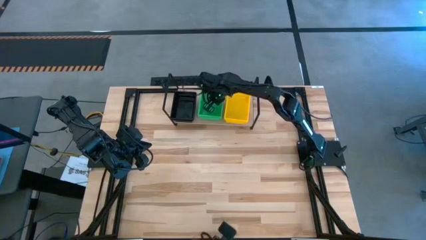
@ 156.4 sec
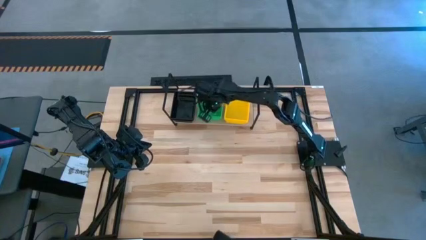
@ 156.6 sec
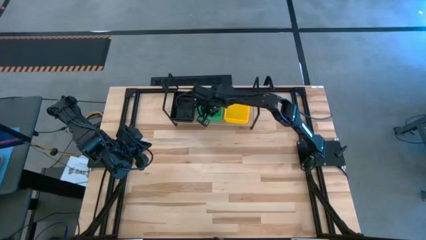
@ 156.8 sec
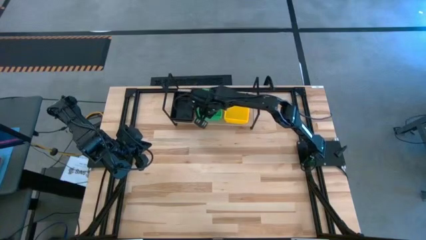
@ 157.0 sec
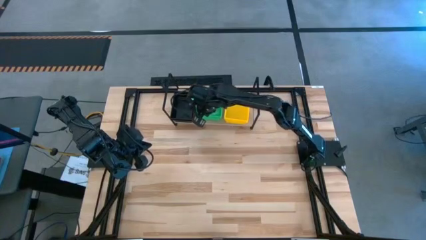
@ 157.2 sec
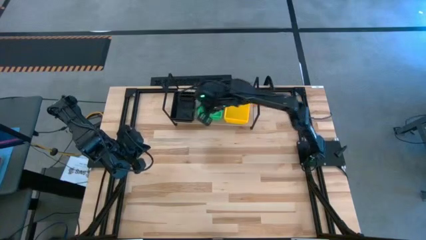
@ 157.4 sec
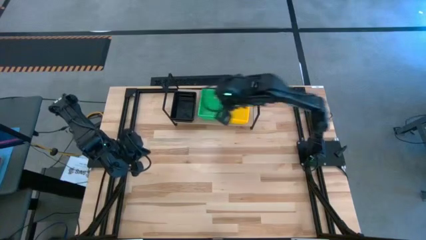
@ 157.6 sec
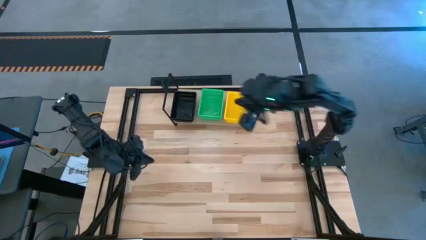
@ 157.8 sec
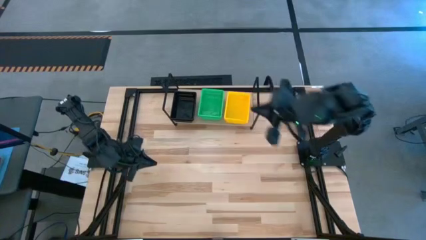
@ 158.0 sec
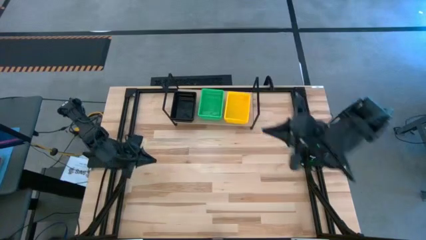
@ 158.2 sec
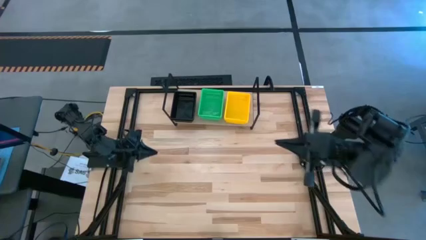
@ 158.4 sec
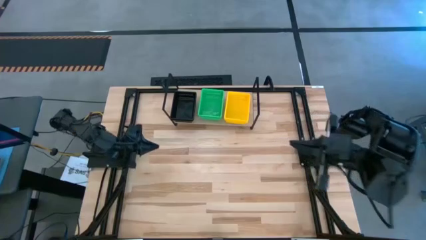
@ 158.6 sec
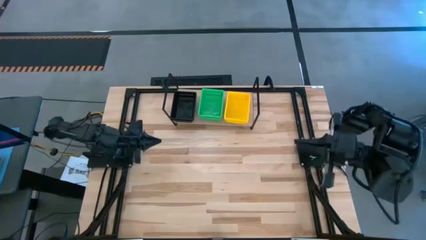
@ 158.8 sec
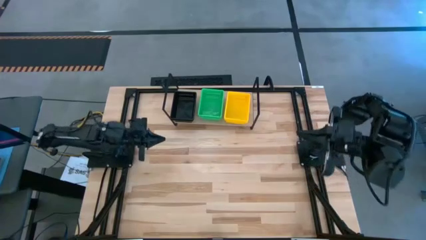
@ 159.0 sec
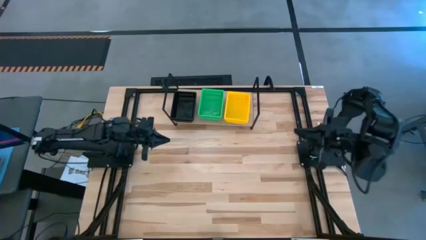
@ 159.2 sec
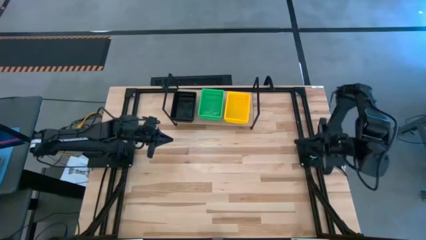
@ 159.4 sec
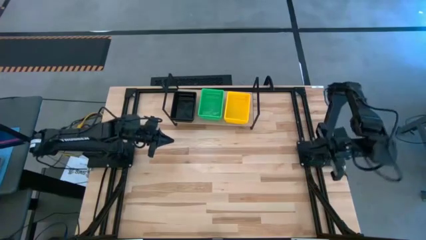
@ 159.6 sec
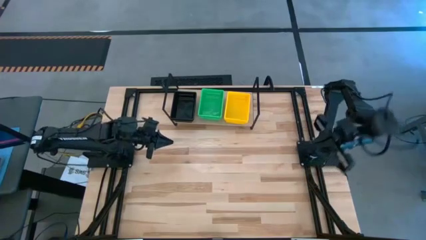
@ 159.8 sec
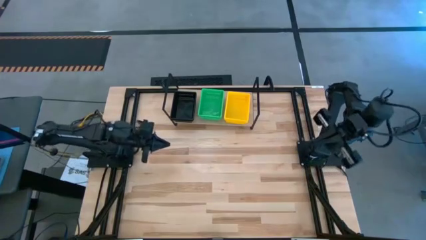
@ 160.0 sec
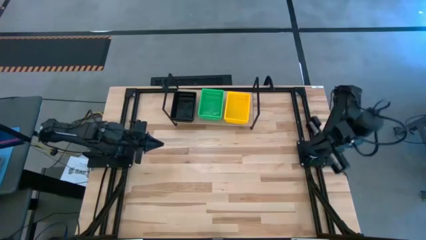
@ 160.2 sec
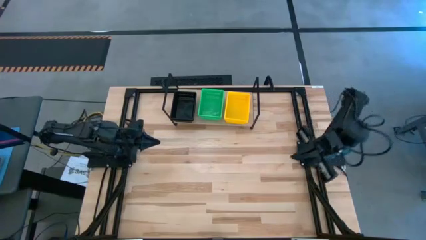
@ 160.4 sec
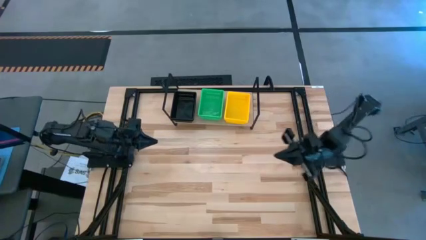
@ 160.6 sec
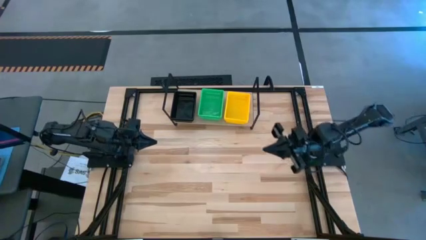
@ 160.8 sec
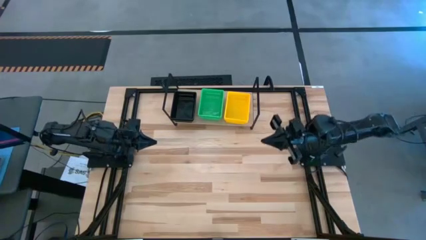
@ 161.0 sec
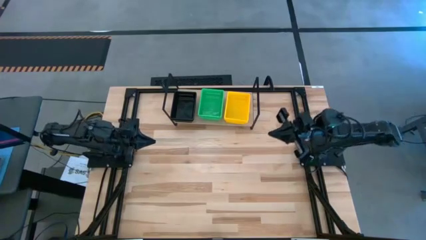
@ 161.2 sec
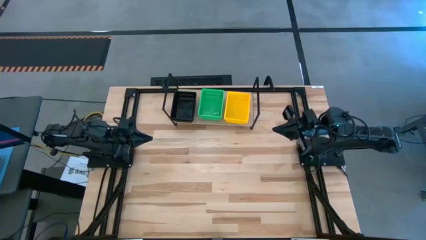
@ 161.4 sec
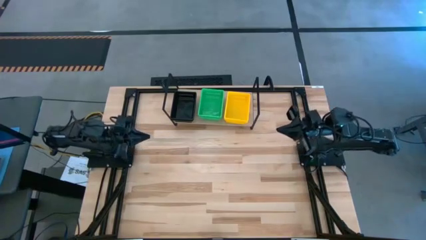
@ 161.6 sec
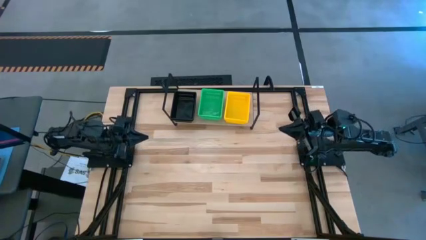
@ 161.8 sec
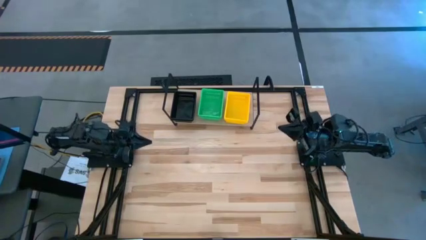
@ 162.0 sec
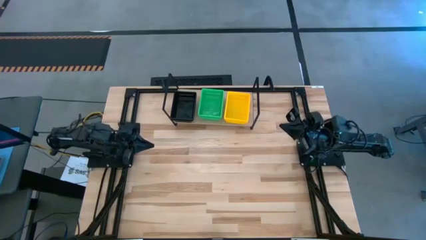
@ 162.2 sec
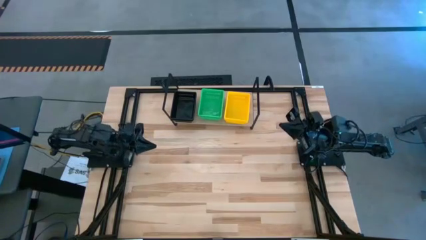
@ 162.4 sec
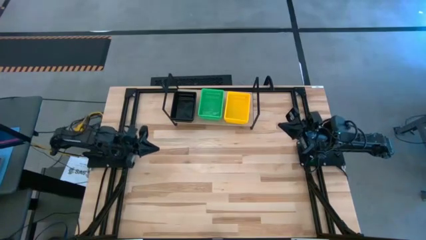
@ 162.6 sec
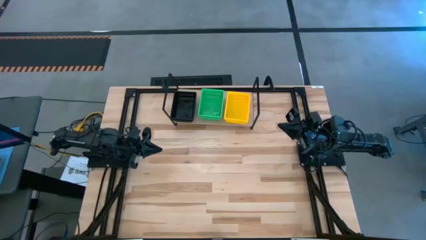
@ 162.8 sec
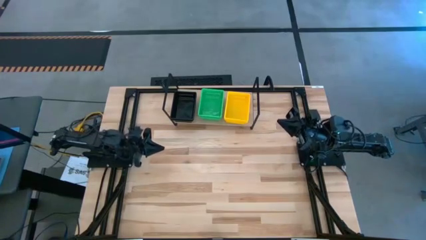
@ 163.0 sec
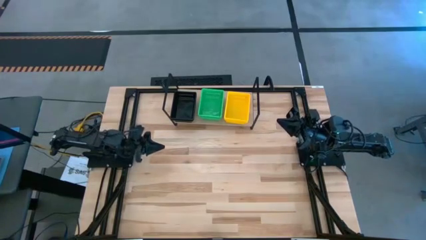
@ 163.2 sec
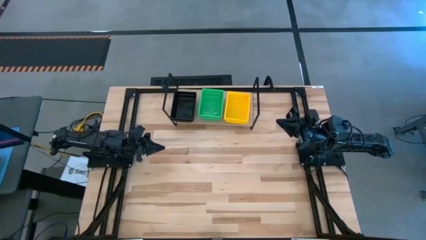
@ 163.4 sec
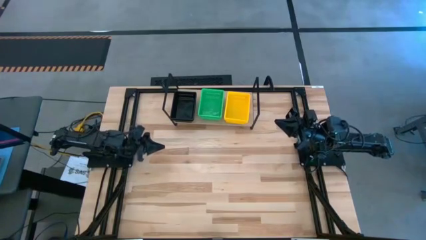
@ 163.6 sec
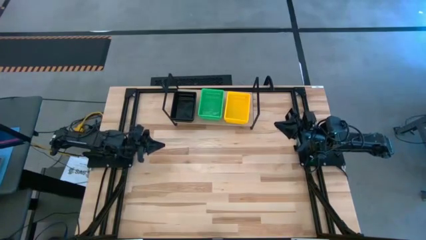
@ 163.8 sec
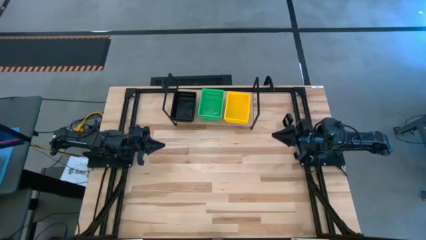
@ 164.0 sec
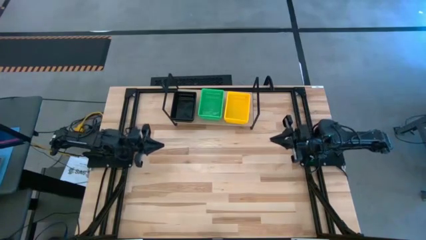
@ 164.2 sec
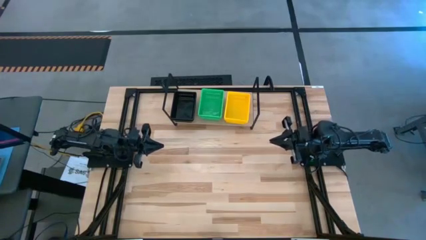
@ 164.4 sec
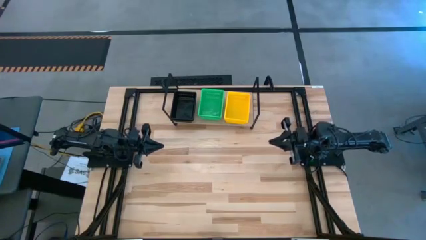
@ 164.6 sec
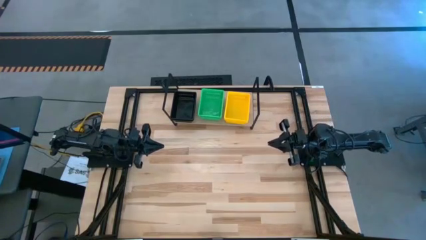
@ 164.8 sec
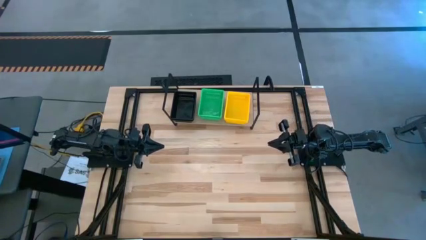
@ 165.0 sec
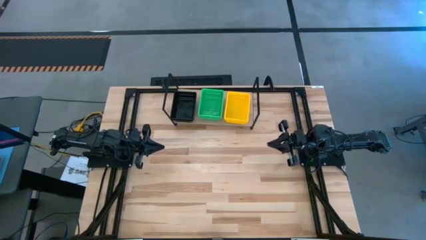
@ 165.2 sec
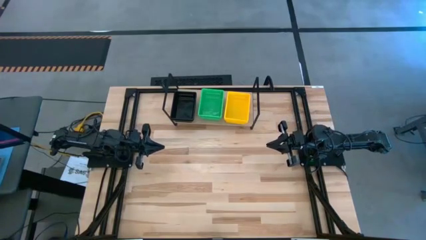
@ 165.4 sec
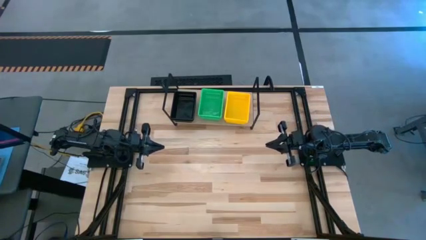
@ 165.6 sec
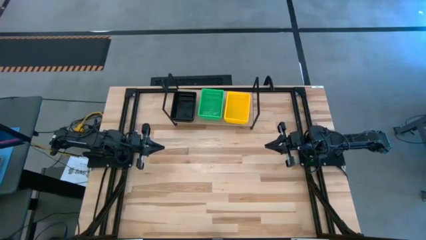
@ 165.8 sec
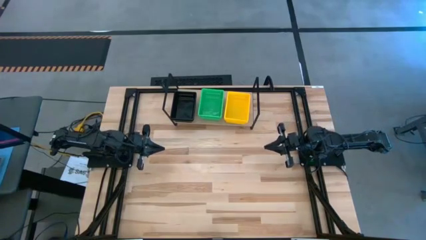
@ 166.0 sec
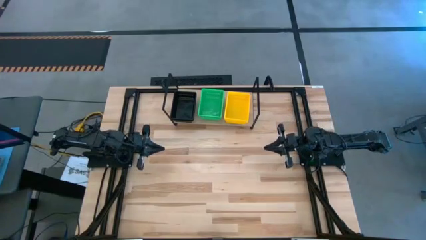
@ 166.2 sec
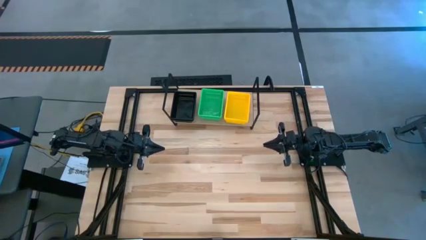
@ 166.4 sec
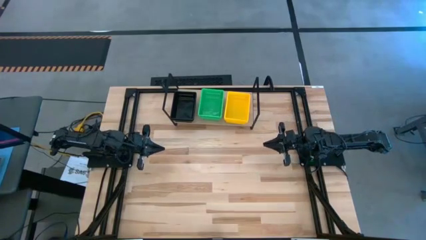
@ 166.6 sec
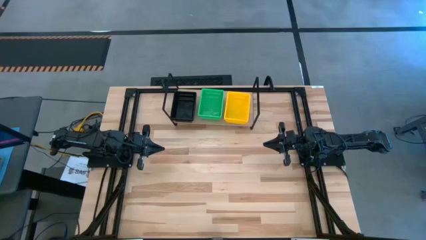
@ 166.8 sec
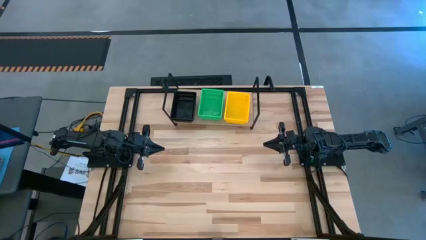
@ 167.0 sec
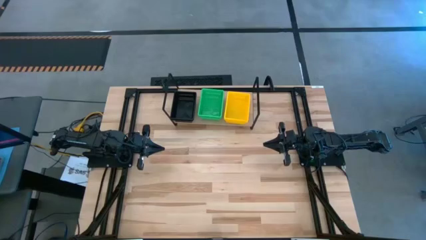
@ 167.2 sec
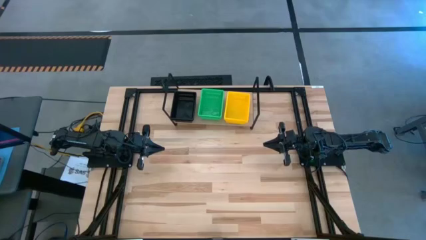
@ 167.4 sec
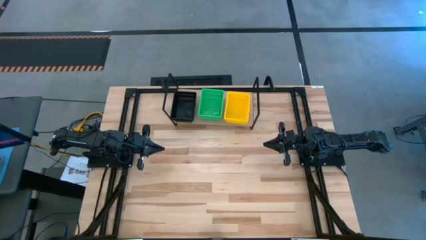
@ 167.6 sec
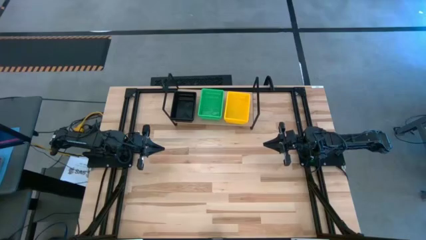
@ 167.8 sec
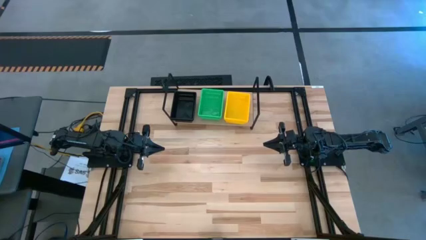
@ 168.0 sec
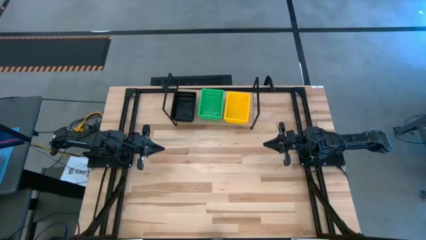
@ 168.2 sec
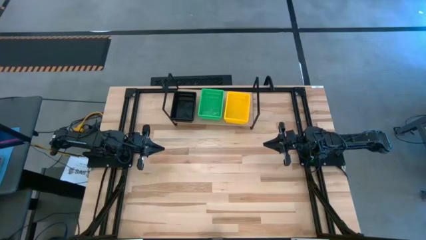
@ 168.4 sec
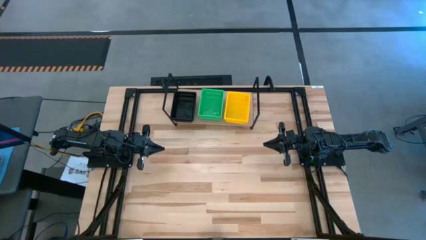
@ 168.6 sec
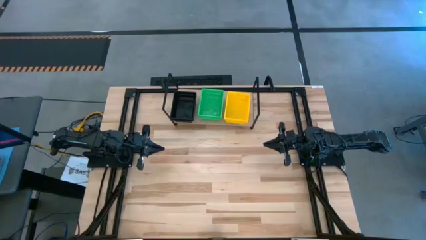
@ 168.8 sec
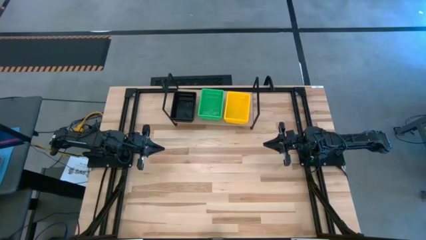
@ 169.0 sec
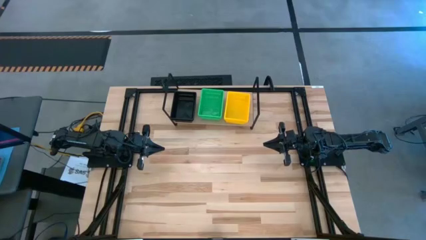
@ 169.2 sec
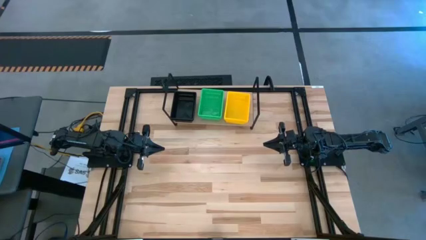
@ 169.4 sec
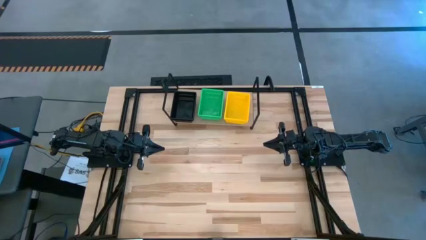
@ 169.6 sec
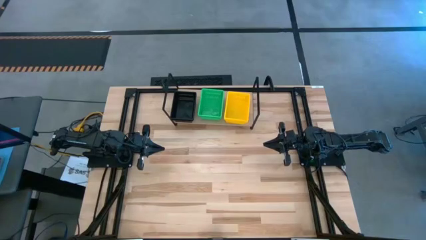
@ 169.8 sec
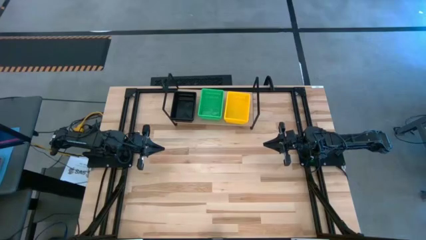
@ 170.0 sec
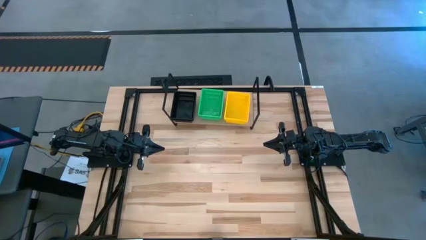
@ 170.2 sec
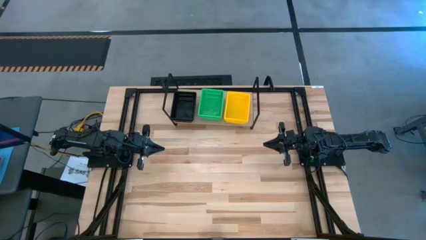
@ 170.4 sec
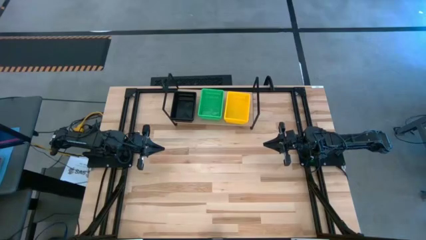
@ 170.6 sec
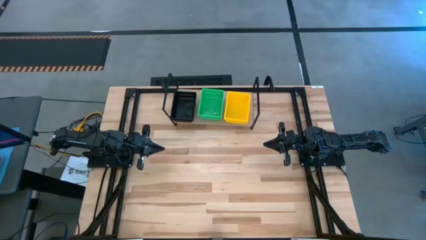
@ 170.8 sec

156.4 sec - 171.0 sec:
Task: Stack baskets on shelf by color
Return to Home Position

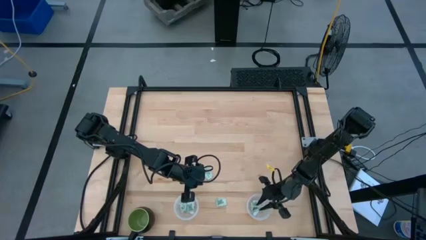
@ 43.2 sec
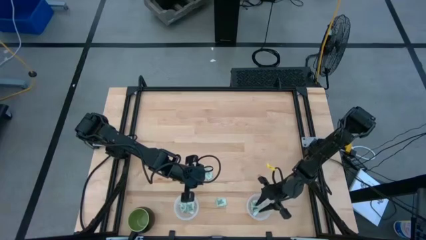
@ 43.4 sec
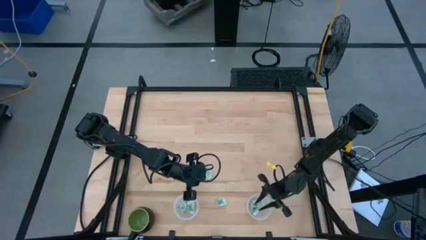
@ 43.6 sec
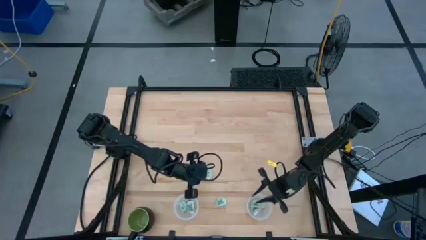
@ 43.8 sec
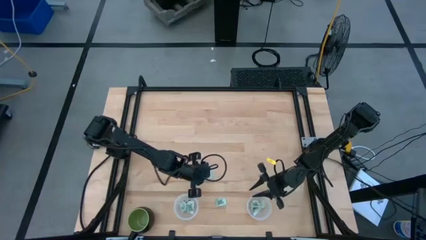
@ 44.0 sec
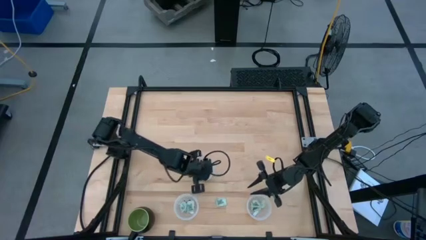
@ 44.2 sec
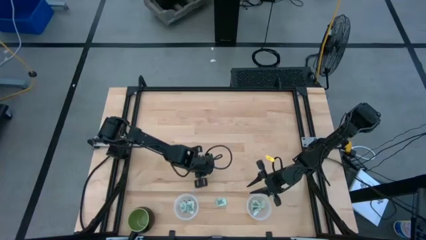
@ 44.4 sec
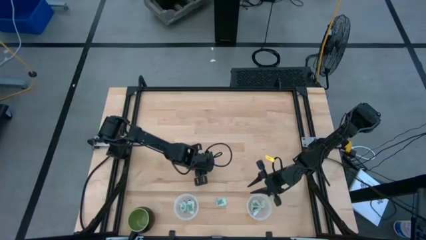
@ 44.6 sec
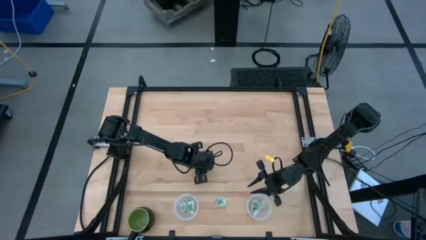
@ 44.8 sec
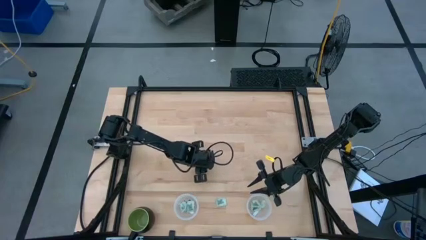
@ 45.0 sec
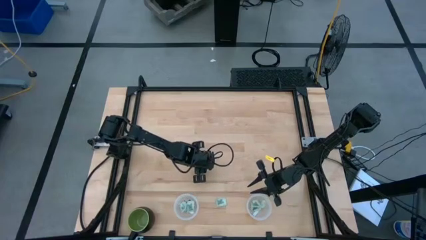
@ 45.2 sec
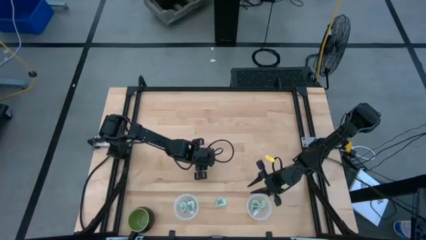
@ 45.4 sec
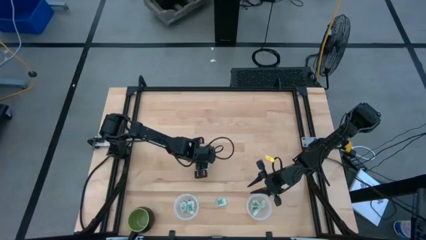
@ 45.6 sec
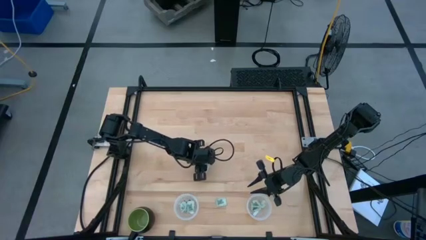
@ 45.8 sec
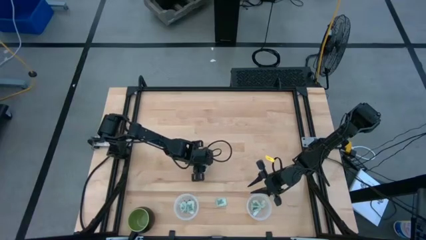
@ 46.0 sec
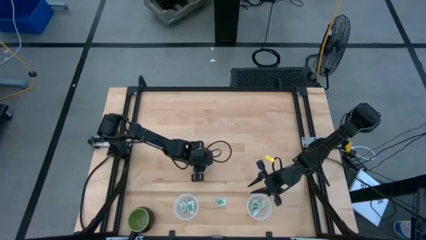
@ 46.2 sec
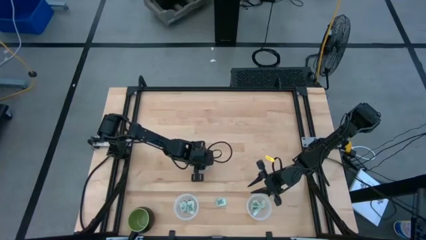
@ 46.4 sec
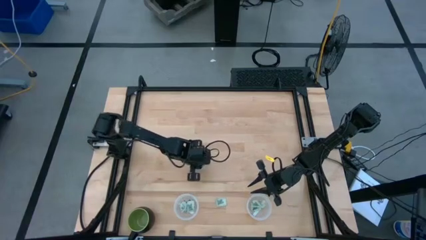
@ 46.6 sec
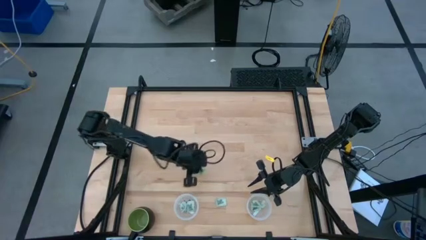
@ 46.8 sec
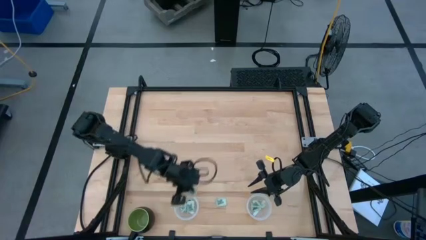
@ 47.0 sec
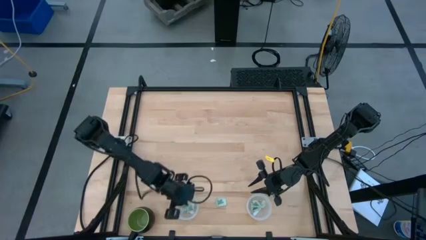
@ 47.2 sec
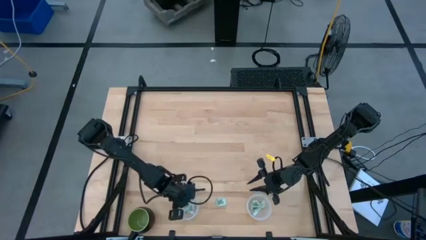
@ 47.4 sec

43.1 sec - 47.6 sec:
Task: Pick and place Stevia / Truvia into bins
Put the stevia packet into the left transparent container
